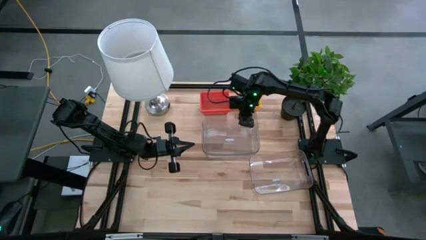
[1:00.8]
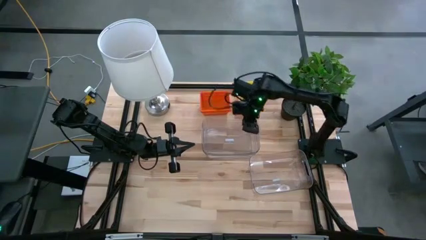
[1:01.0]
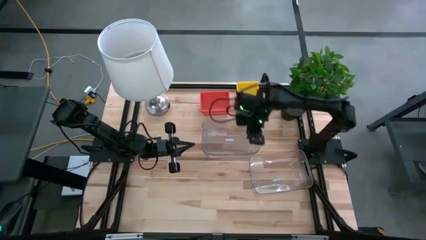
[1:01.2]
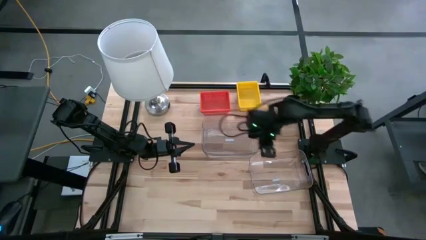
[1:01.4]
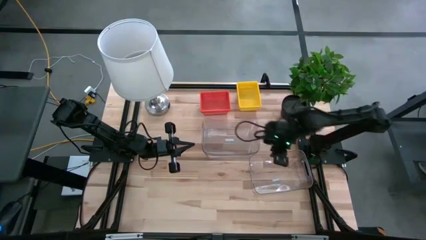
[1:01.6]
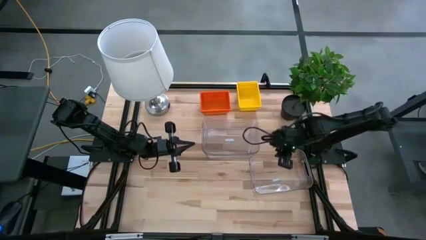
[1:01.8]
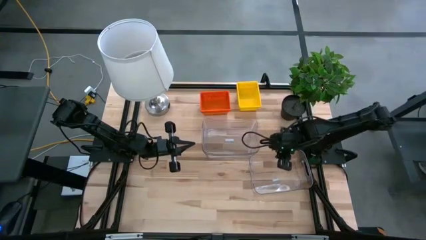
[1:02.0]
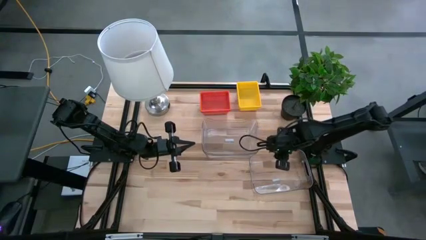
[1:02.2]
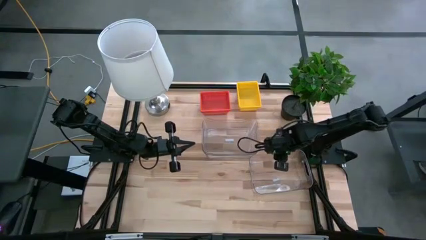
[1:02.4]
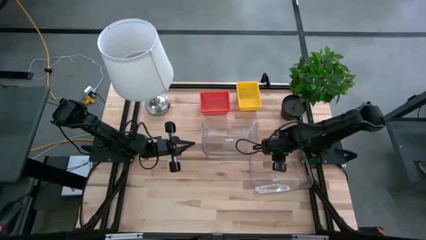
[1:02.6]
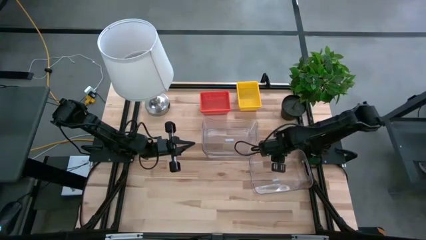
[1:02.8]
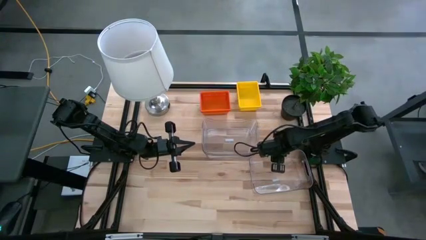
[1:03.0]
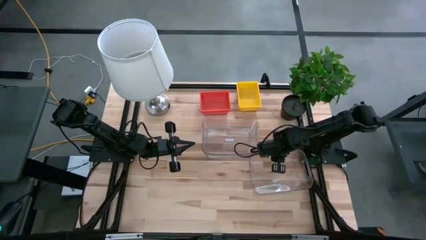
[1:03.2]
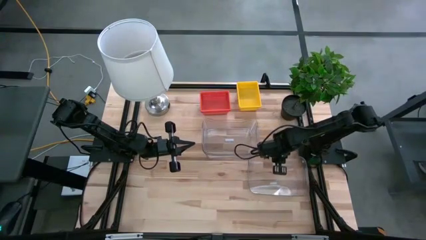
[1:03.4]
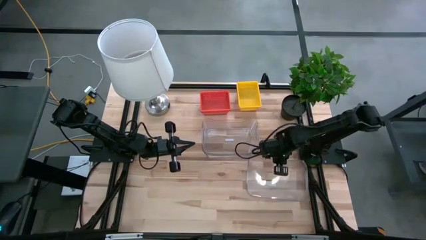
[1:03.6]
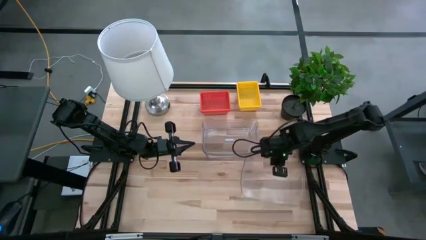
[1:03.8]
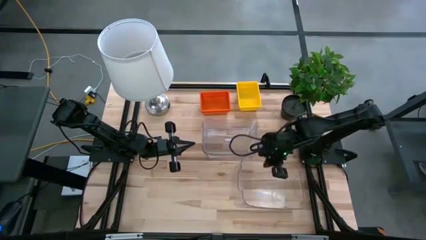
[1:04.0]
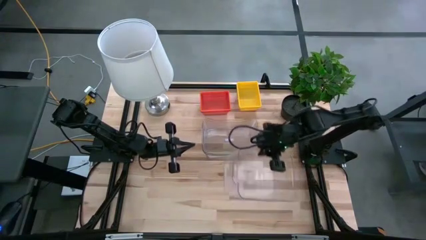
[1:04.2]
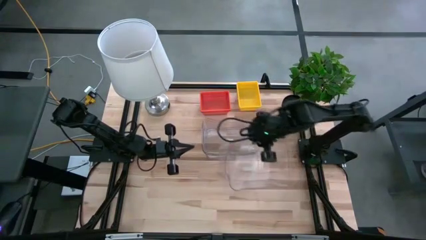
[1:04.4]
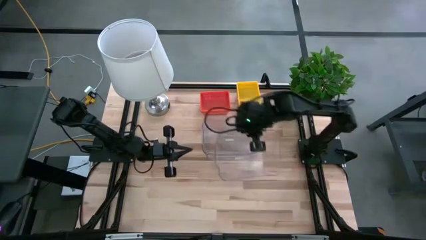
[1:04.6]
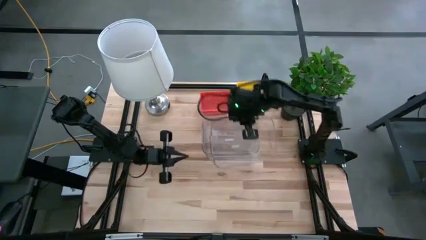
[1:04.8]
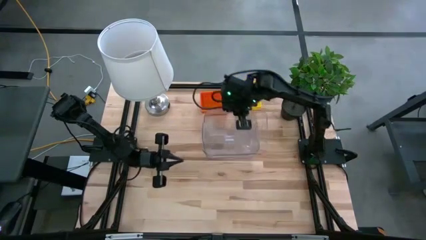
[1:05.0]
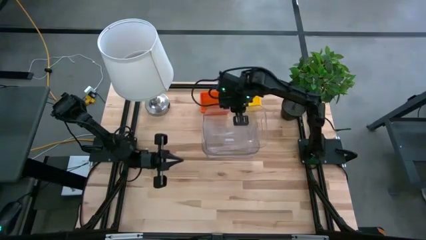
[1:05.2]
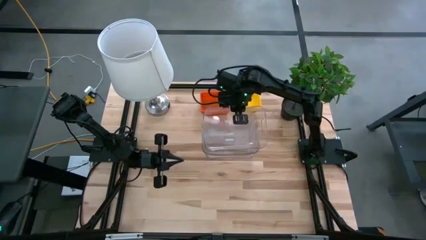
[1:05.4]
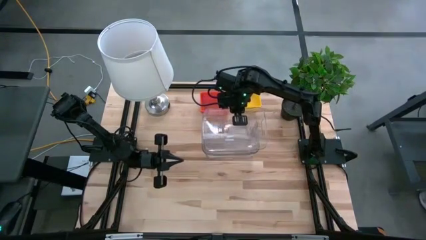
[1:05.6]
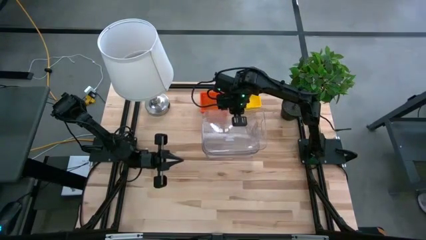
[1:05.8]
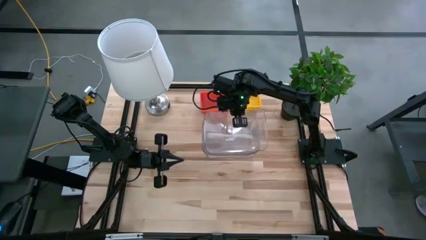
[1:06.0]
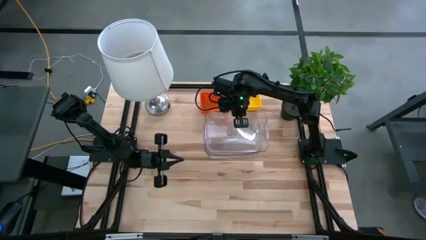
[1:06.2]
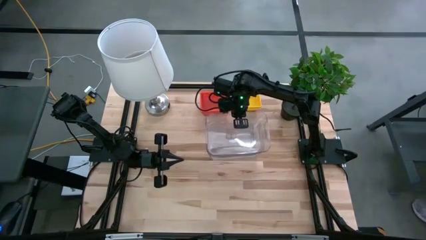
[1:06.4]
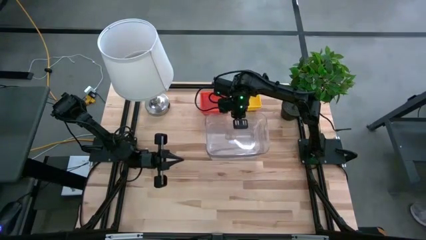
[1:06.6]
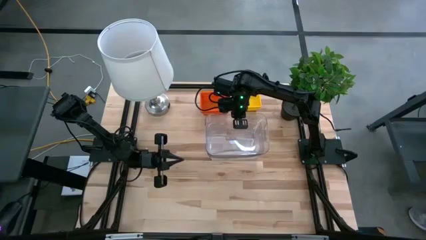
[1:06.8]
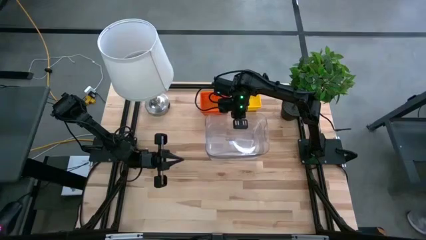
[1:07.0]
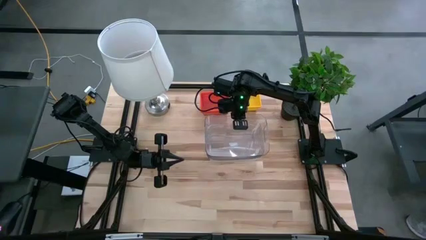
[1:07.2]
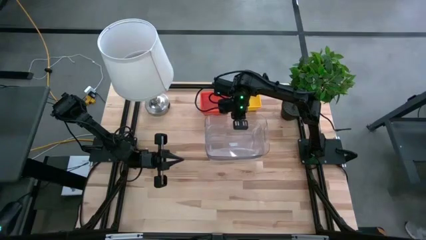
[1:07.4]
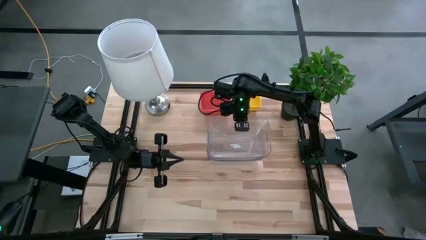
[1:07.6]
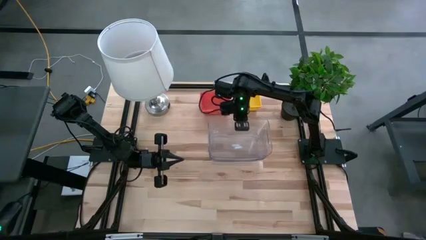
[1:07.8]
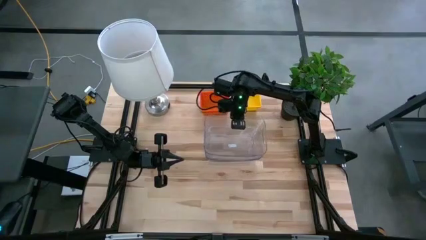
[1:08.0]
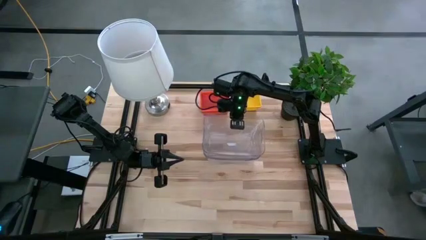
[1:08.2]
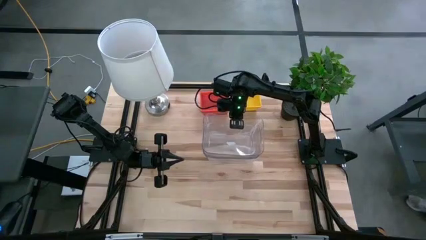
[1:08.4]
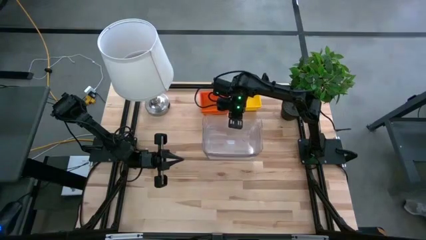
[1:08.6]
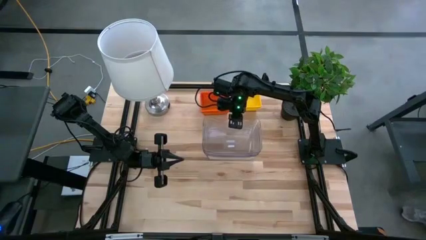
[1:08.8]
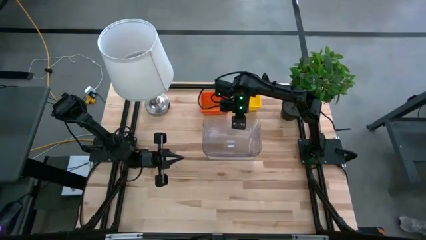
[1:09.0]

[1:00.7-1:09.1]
Stack the bottom transparent bin on the top transparent bins

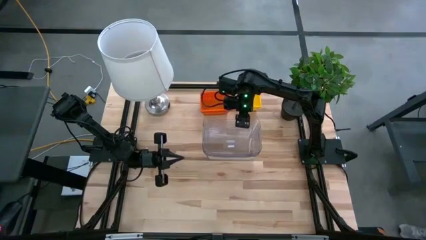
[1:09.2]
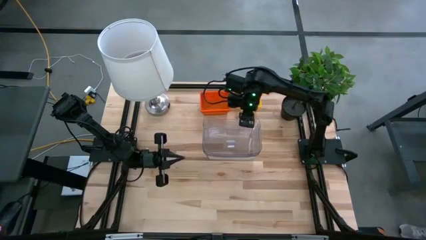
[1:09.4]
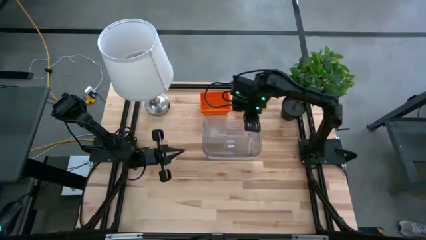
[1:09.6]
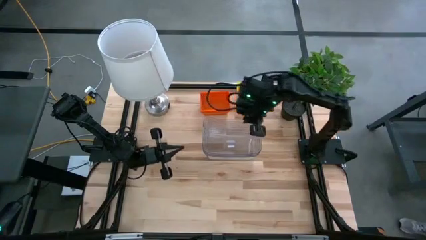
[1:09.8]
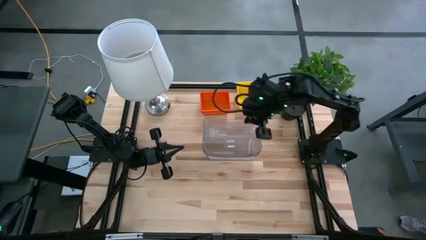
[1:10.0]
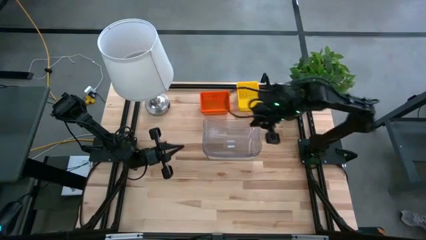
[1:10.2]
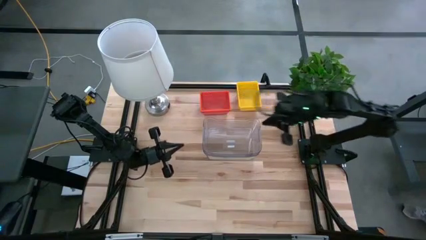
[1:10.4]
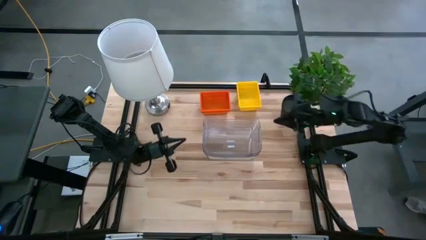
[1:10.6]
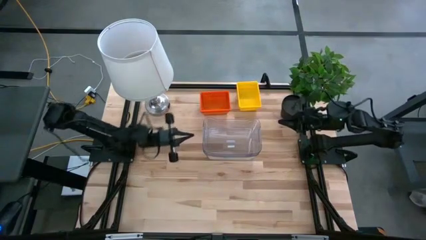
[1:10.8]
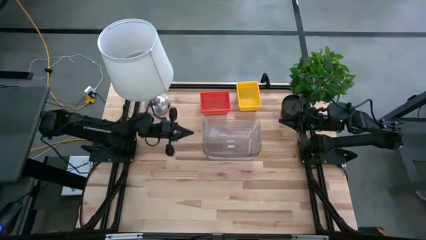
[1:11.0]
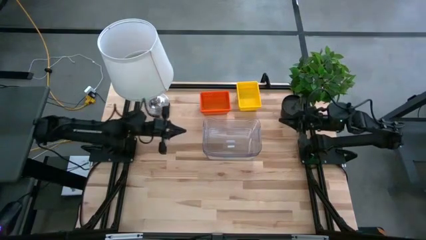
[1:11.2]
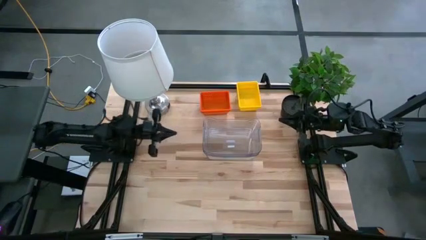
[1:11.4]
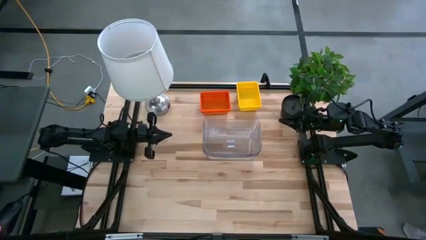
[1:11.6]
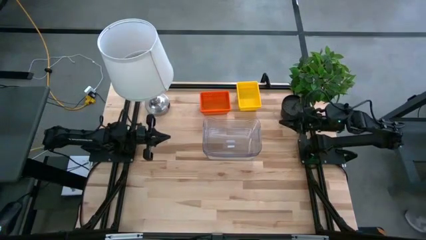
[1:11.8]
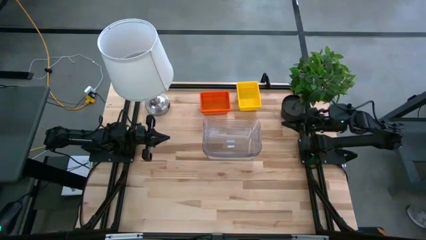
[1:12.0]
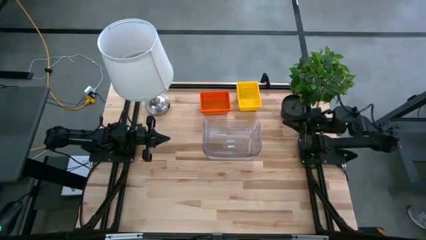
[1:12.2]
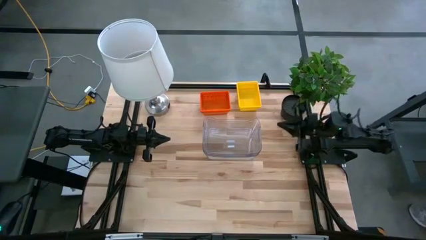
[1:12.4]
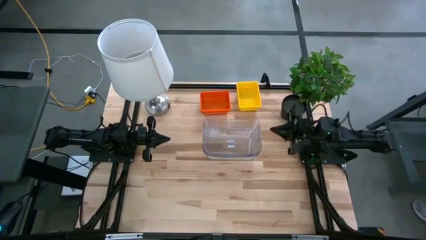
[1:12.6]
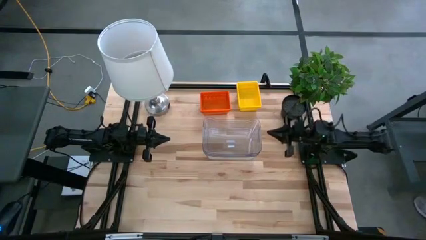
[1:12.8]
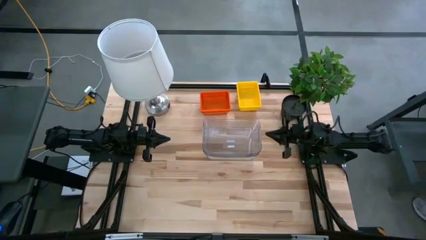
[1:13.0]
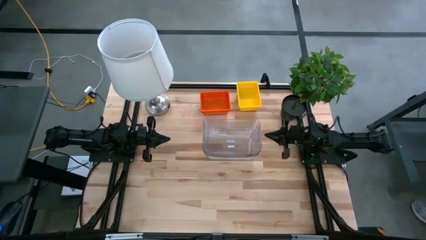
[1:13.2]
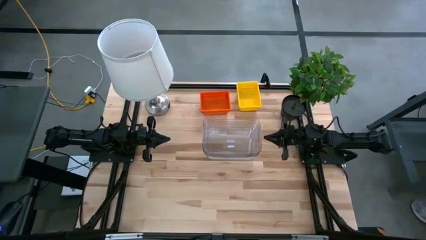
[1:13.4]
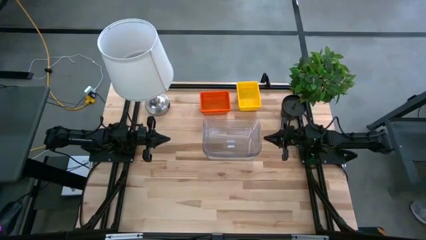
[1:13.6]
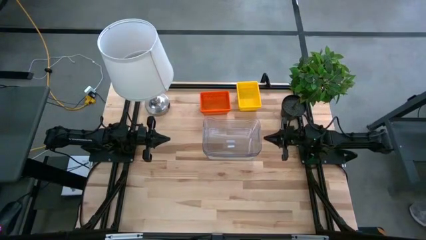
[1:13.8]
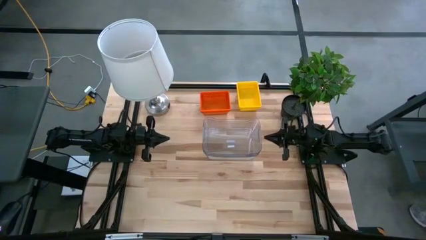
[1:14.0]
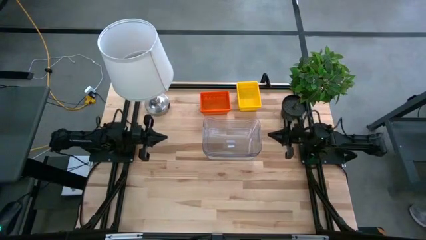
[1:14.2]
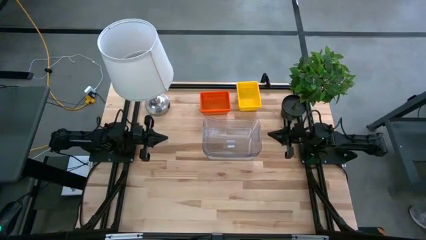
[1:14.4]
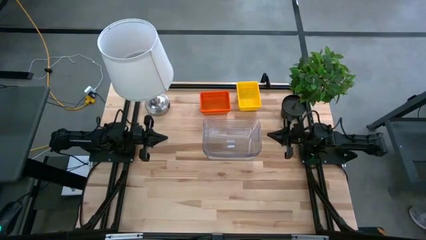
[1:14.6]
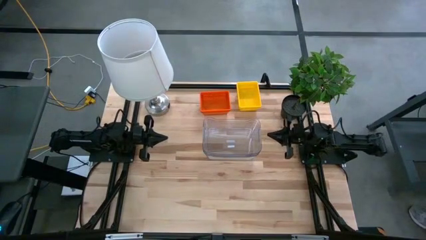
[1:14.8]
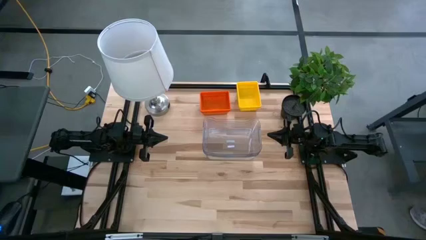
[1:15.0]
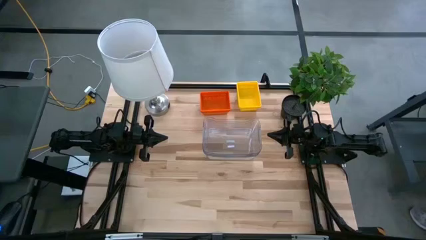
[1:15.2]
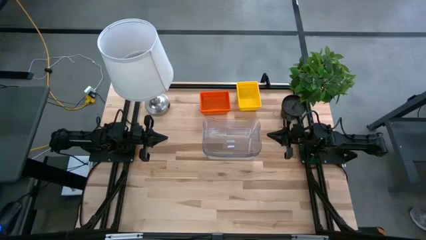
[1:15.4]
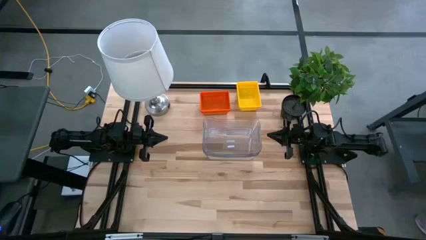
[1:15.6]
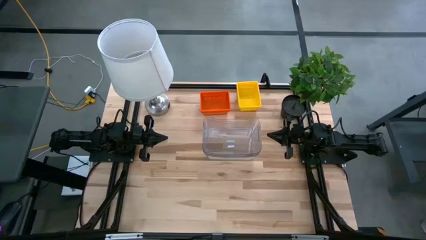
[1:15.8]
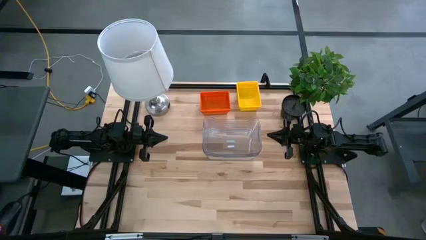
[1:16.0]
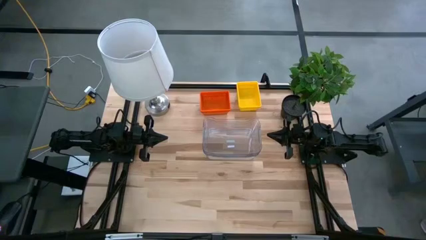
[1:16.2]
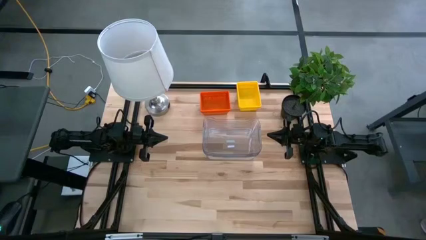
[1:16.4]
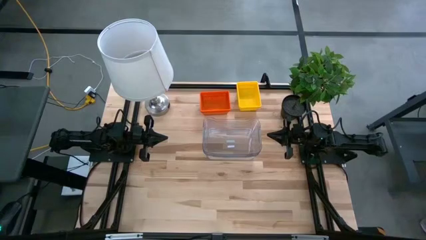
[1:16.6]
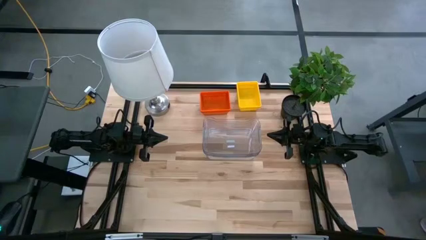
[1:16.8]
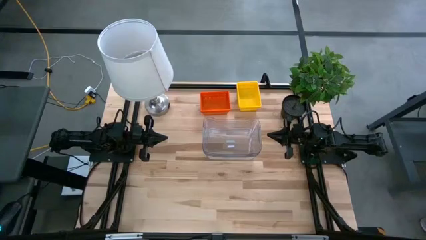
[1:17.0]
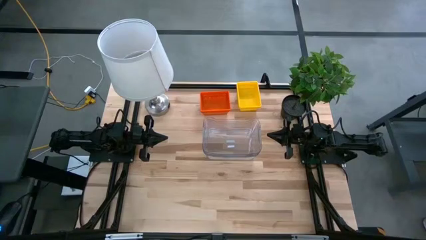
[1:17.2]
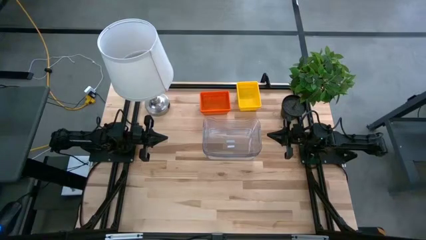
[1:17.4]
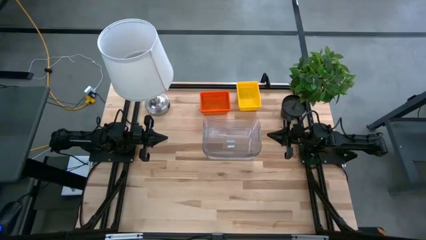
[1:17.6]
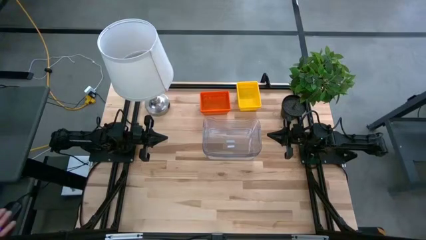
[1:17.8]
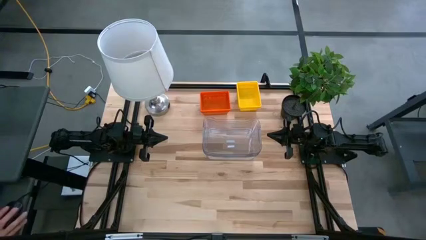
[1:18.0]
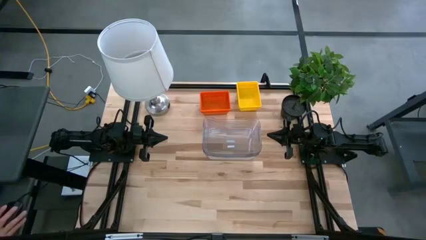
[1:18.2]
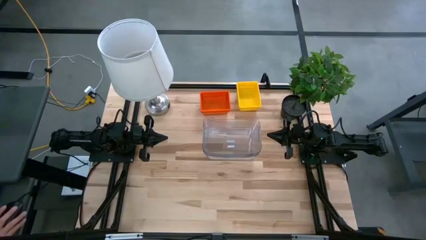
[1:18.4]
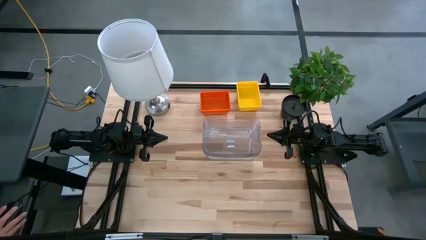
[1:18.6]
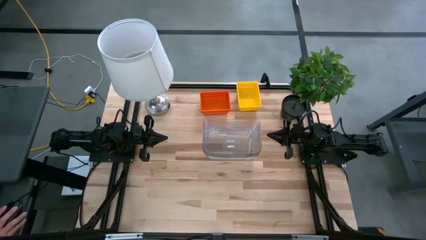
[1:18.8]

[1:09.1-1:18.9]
Return to Home Position
